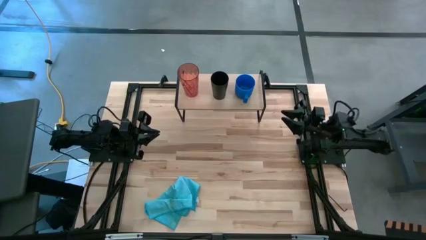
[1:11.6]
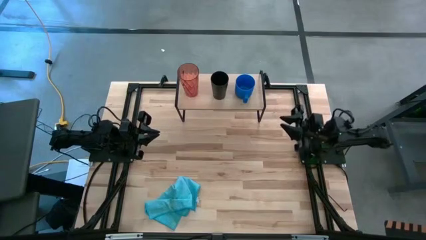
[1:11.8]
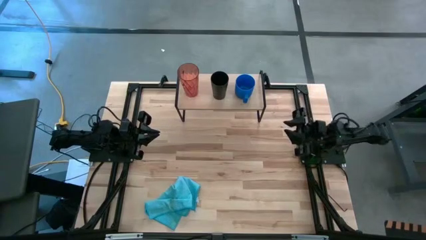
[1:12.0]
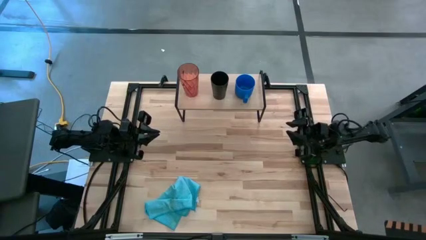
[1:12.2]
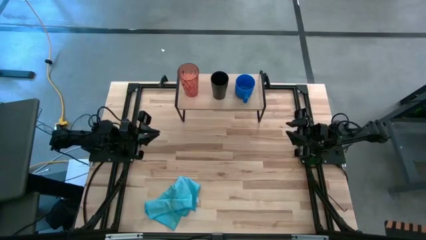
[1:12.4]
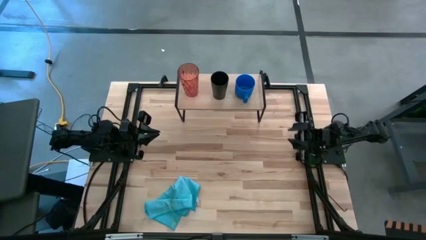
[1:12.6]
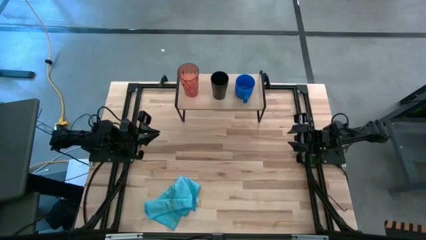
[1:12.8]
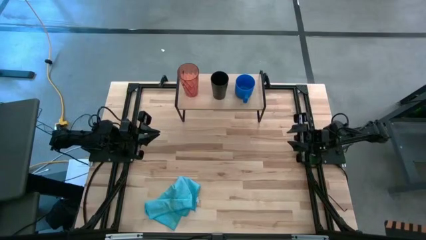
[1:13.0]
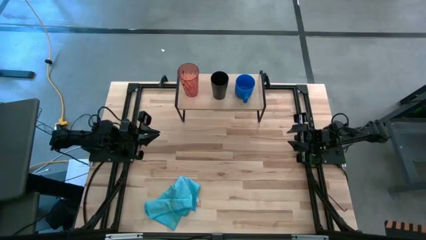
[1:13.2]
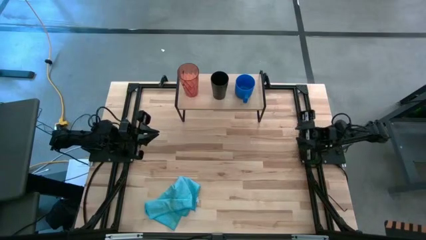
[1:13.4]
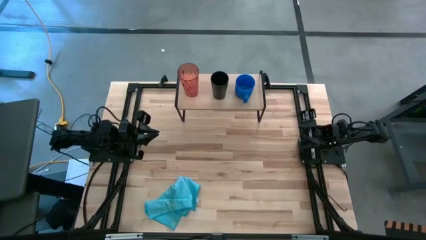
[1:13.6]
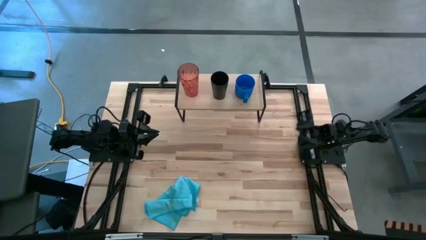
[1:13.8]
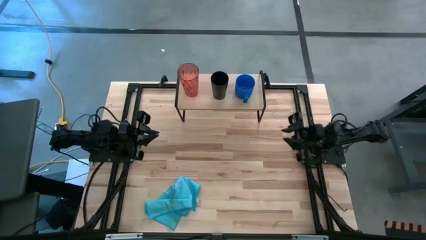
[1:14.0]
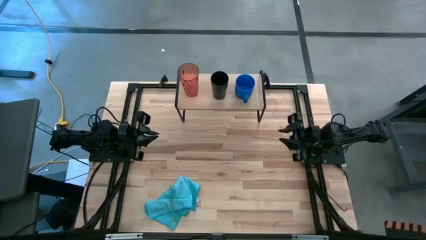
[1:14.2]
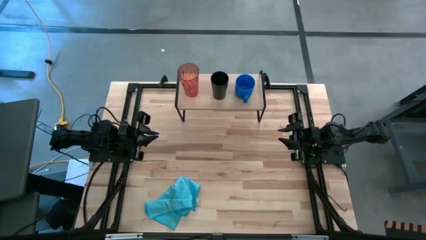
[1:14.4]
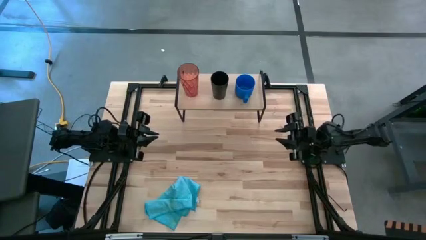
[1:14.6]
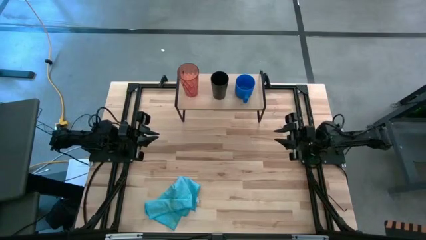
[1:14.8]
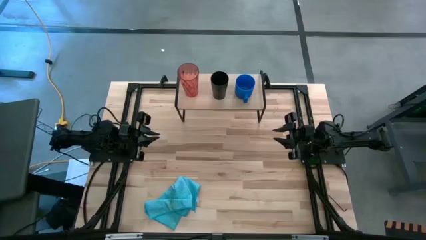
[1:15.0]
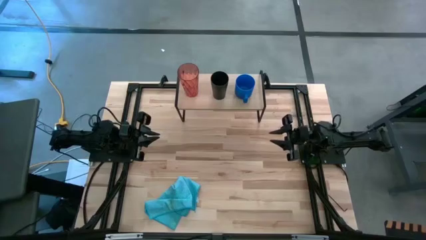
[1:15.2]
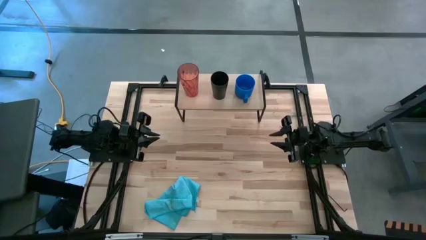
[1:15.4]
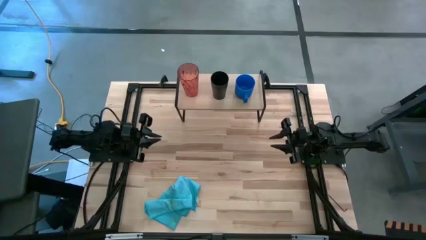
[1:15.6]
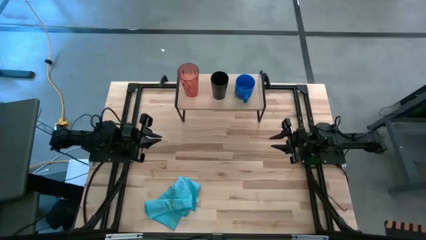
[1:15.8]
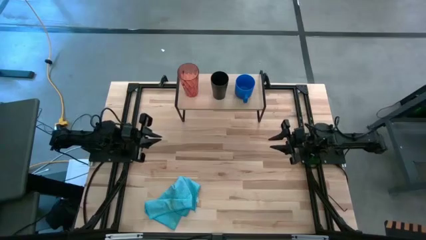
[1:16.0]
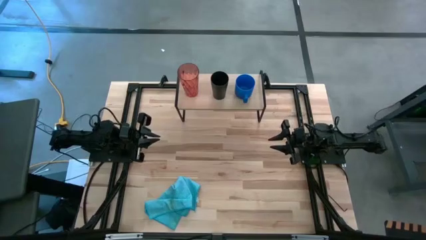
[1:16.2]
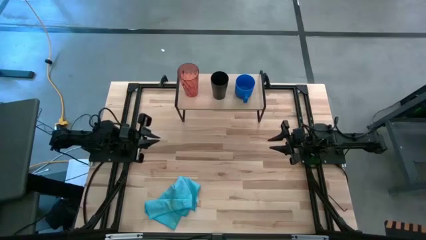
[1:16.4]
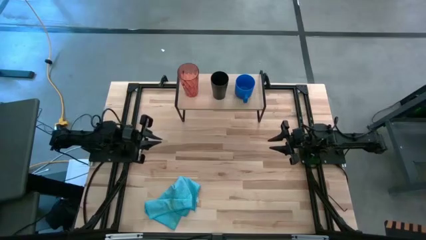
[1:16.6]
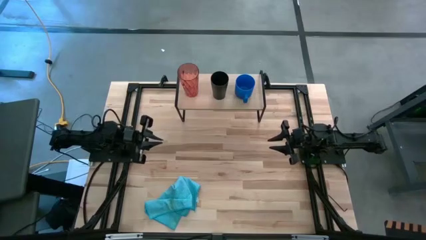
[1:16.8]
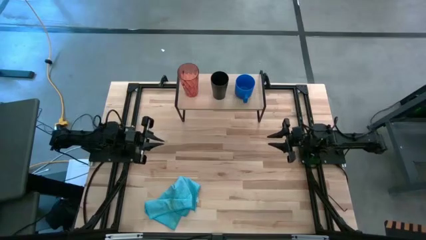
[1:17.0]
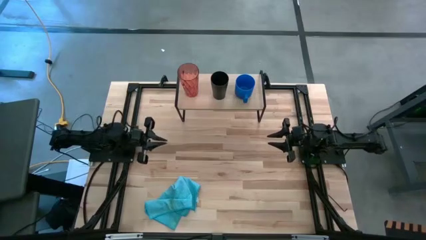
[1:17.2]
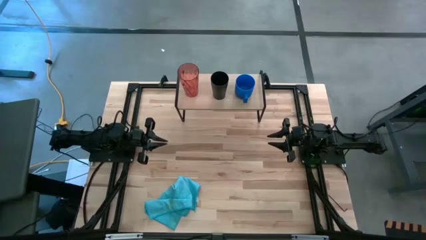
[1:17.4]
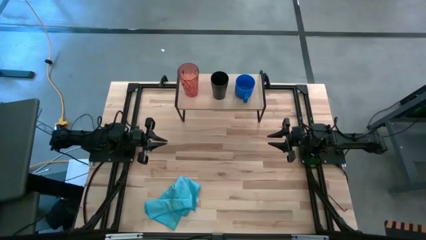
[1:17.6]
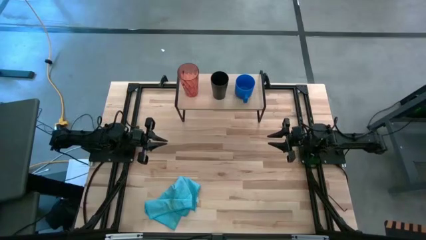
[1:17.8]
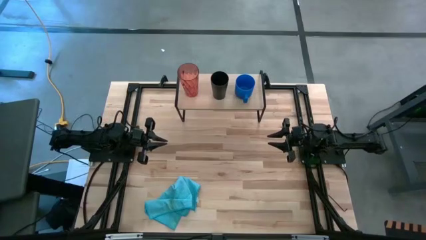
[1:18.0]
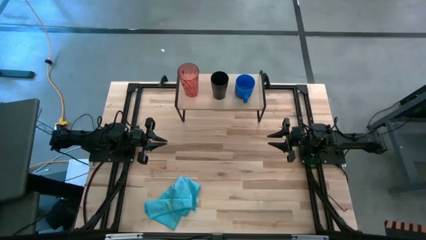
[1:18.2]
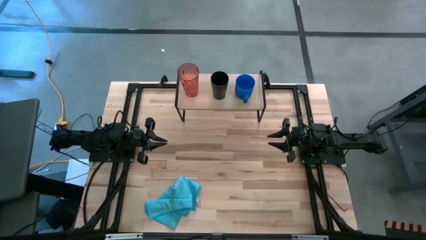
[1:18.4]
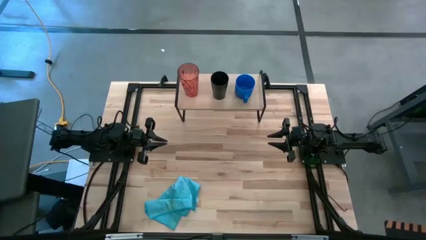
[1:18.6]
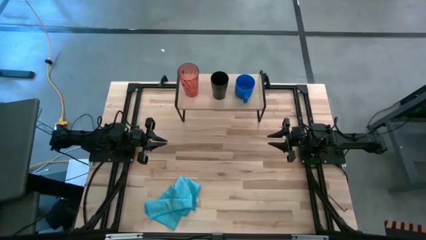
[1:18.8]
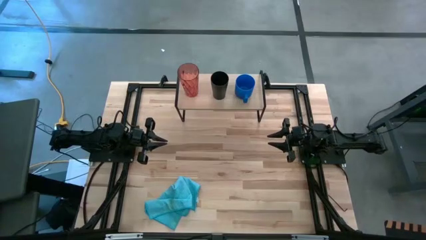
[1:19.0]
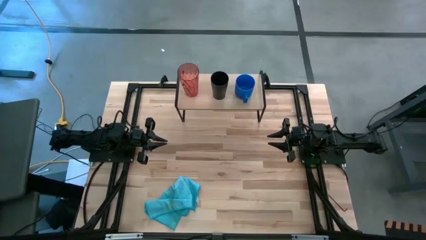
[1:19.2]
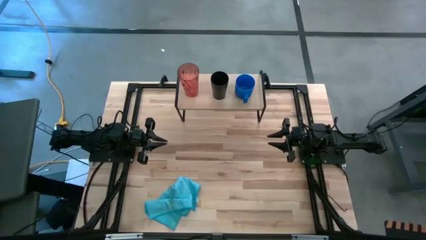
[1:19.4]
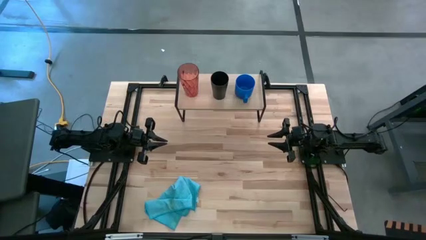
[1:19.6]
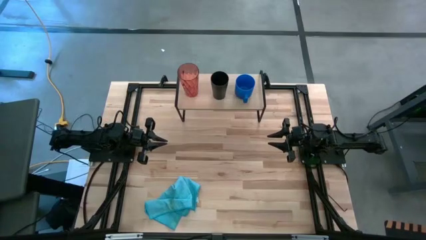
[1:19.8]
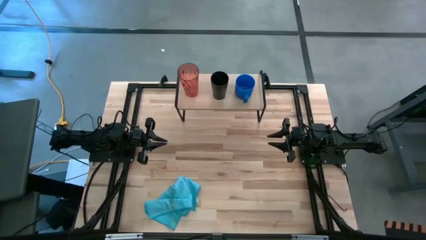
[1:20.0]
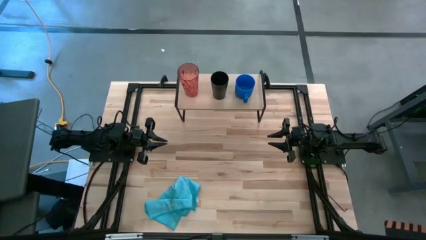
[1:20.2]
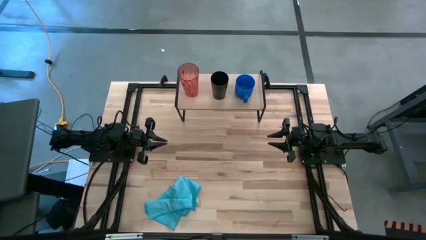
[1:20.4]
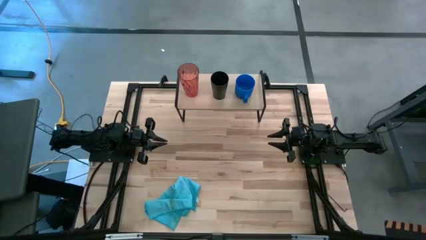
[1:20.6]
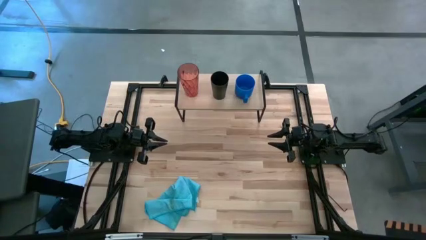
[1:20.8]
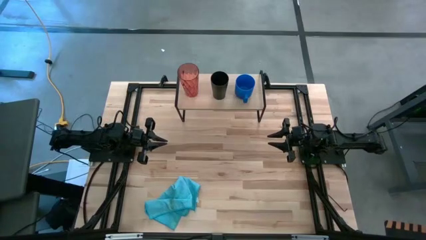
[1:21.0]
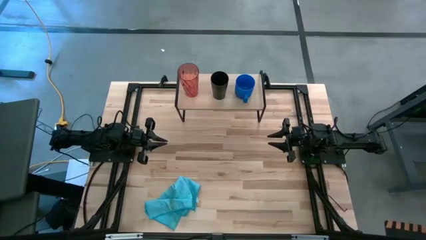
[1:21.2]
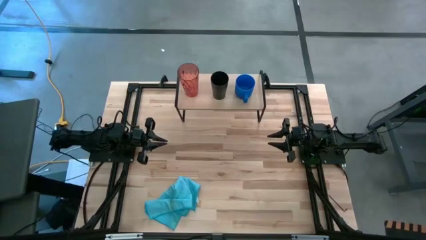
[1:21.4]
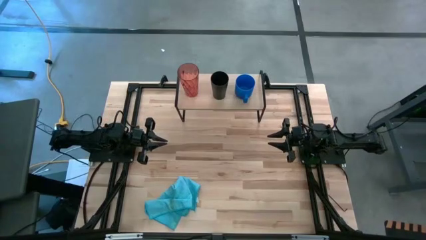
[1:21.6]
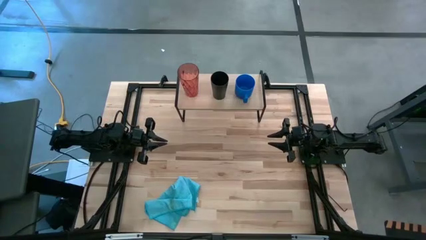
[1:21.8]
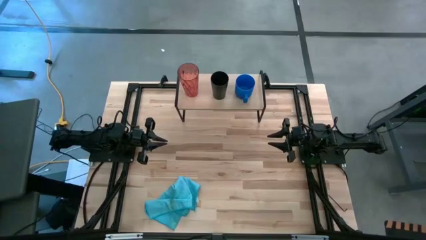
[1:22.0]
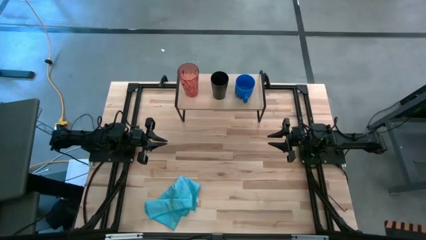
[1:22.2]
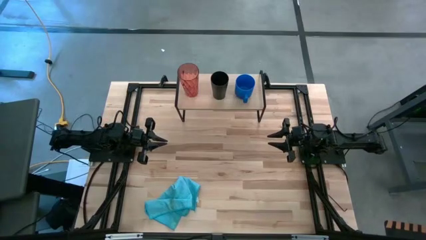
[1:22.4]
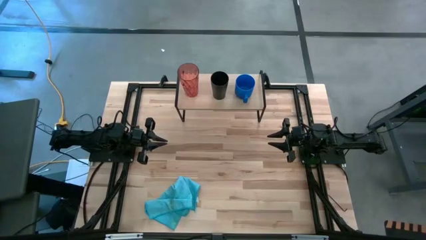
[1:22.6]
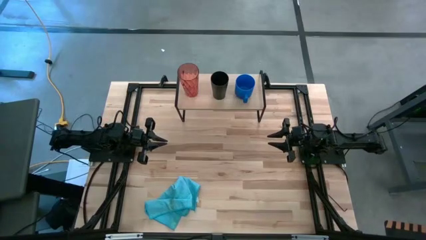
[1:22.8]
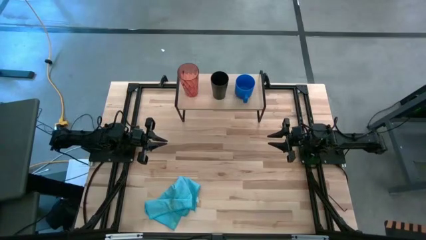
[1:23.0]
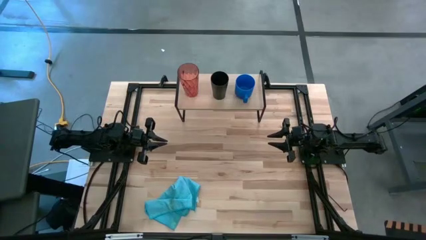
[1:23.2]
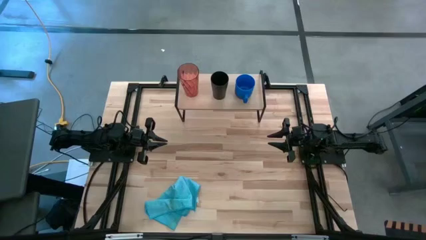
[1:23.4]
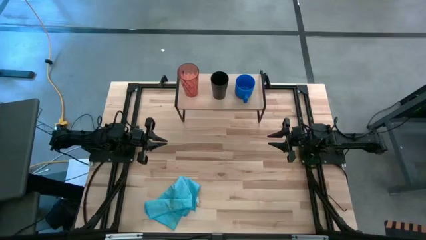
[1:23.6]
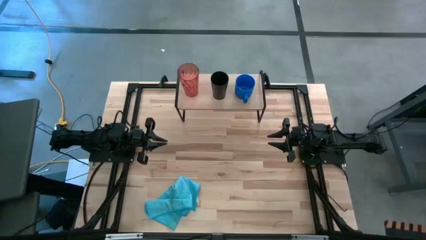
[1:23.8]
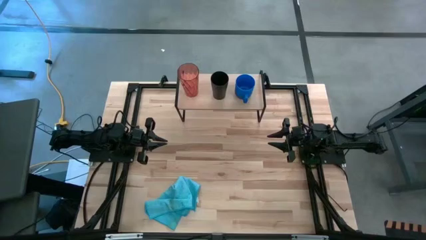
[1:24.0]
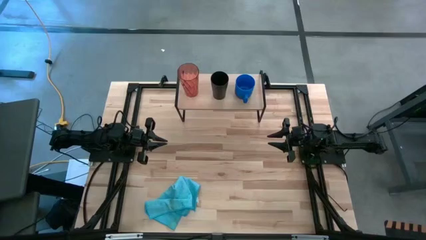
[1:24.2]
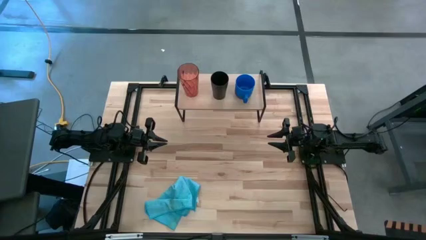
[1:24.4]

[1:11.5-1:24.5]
Task: Stack small to large cups/mugs on shelf
Return to Home Position
